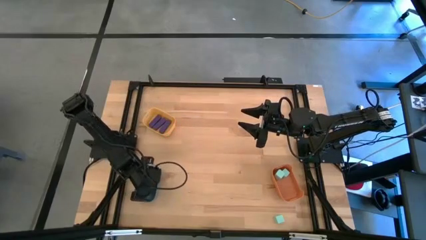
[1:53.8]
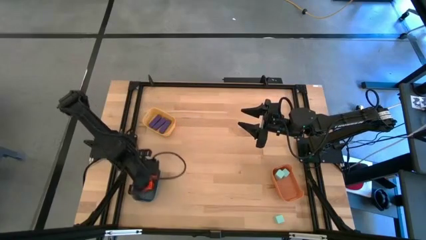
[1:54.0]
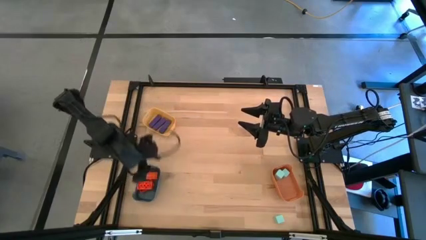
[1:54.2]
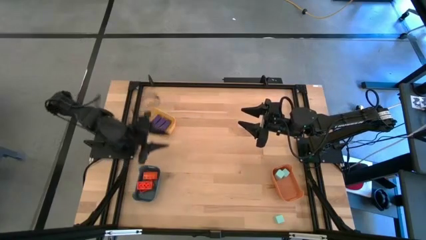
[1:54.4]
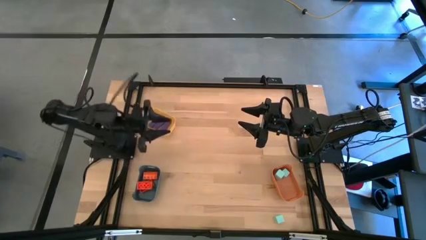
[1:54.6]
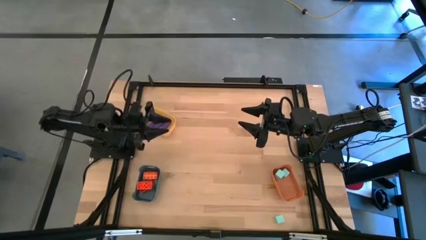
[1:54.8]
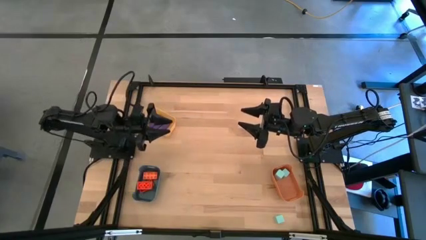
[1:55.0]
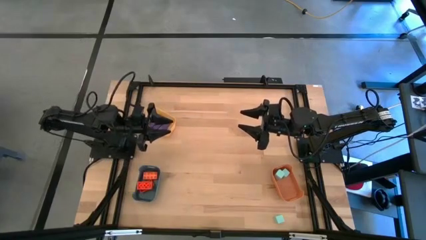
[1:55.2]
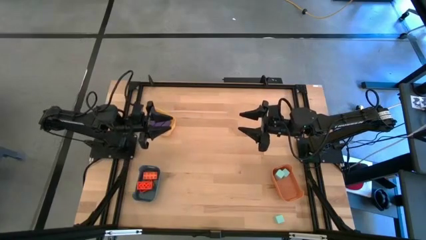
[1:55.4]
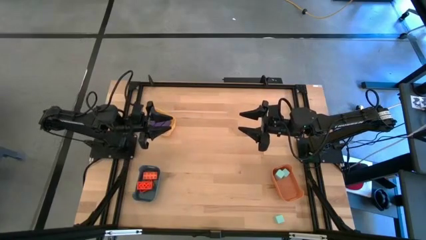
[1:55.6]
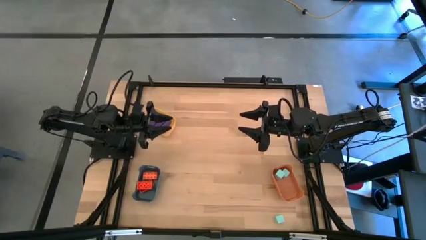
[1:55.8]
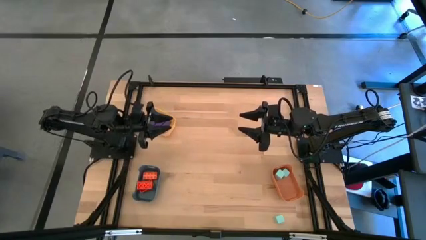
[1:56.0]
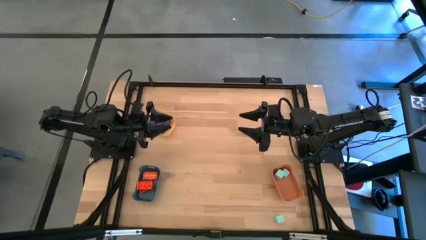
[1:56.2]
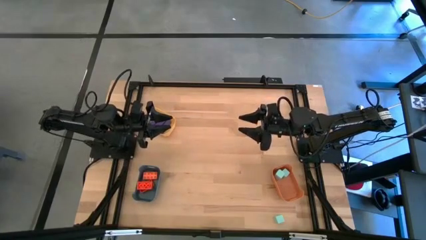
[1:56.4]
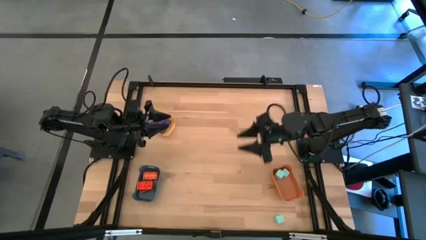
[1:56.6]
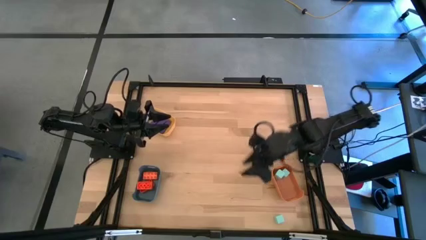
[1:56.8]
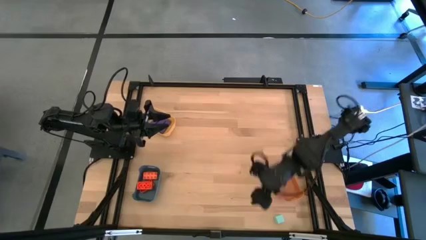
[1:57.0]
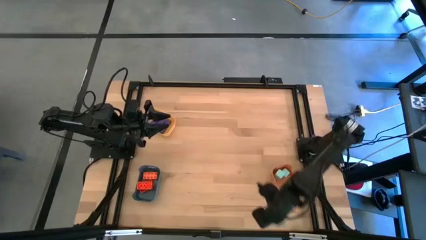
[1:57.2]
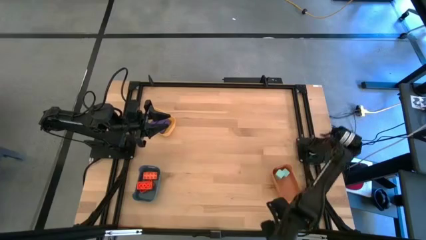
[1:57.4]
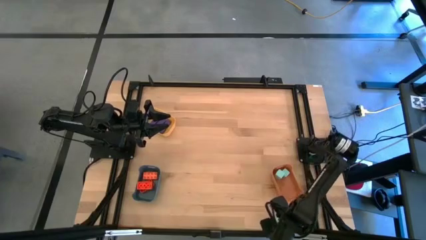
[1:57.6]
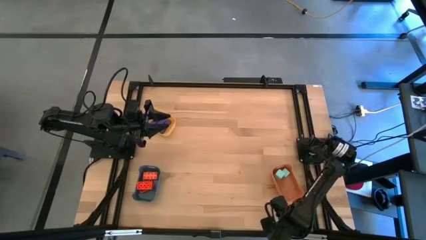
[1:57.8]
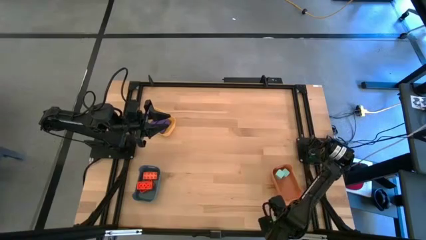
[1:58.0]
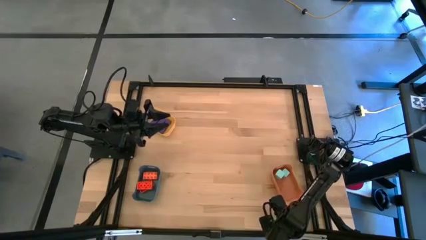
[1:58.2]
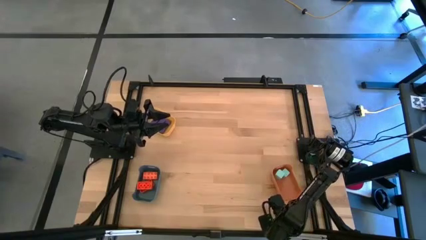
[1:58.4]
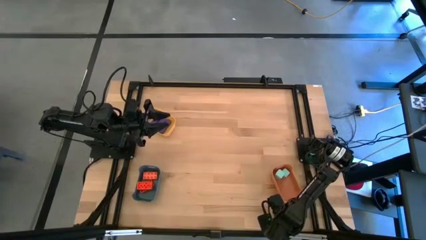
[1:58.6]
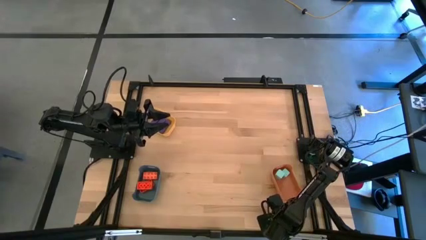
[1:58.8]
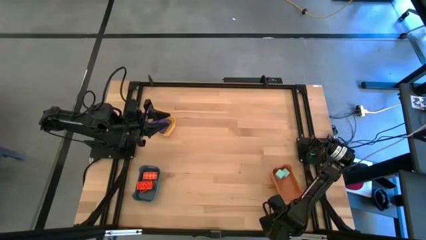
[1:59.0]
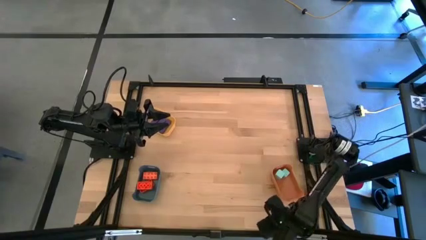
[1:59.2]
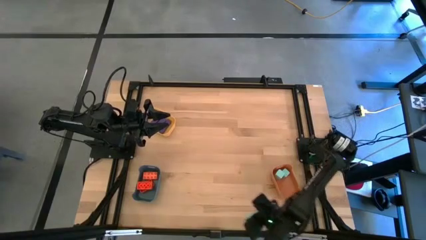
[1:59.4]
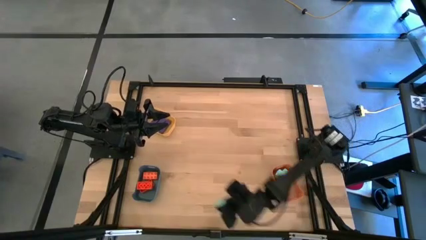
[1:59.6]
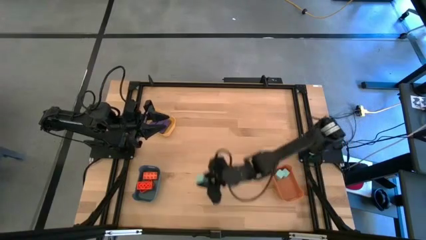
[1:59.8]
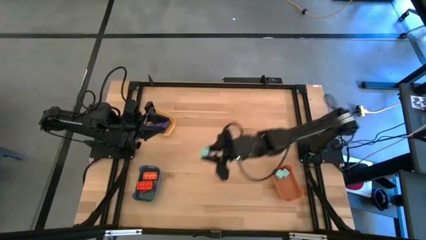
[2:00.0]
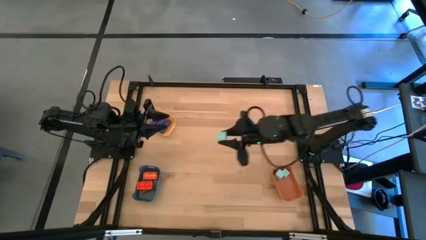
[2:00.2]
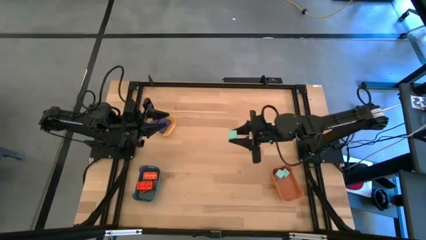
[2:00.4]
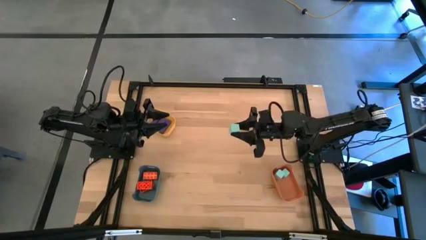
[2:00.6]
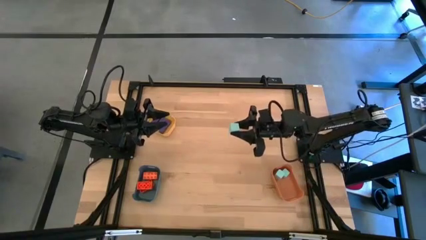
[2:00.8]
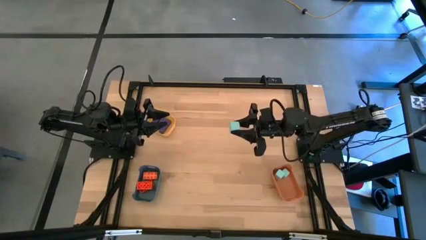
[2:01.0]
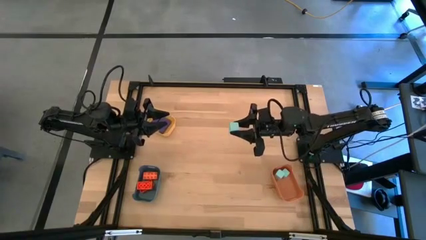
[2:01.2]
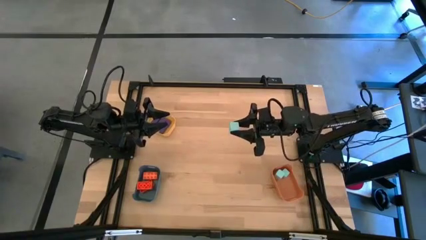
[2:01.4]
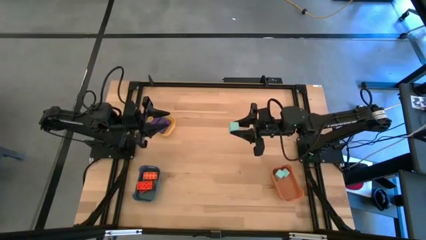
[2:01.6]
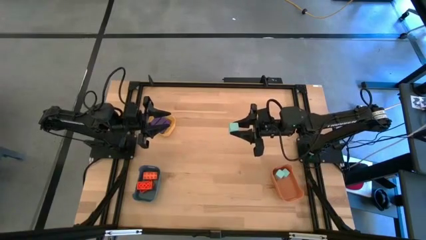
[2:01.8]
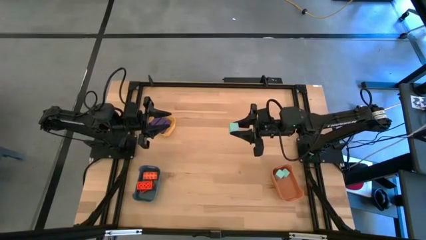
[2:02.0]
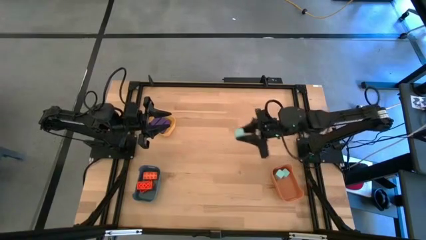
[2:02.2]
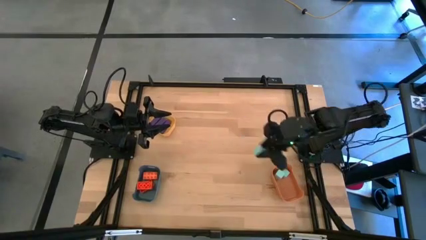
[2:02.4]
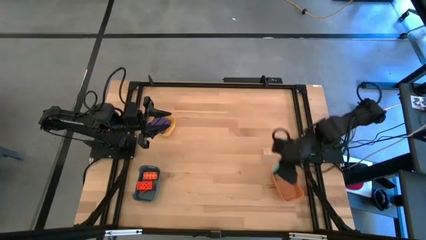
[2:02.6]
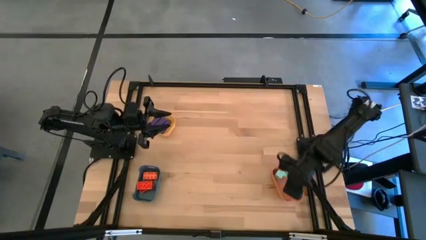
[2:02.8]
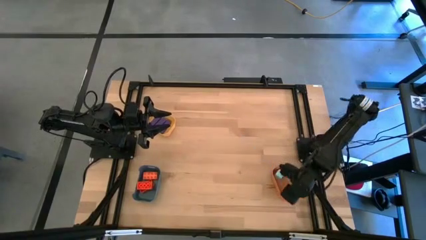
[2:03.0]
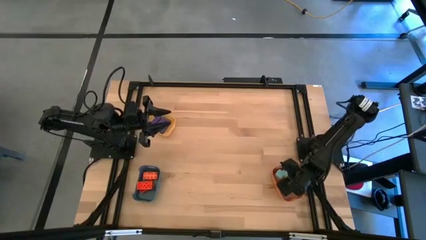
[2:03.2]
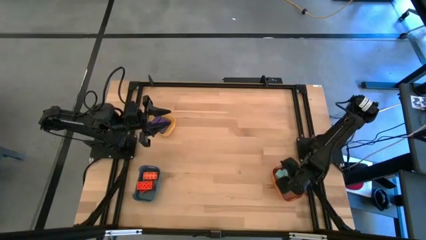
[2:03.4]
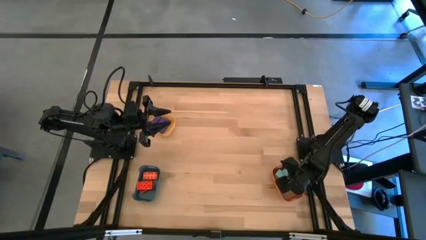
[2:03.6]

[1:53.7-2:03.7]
Task: Sort & place blocks by color
Put the light blue wooden block into the orange bin

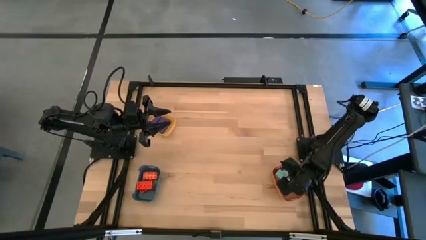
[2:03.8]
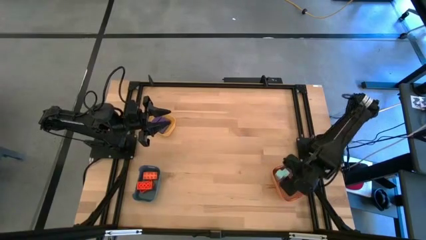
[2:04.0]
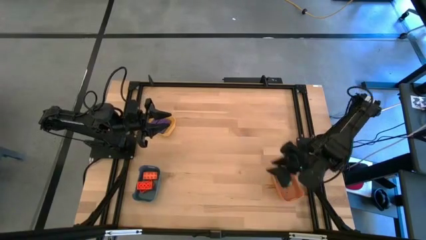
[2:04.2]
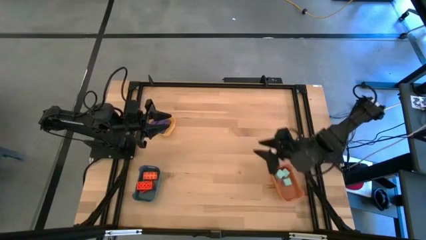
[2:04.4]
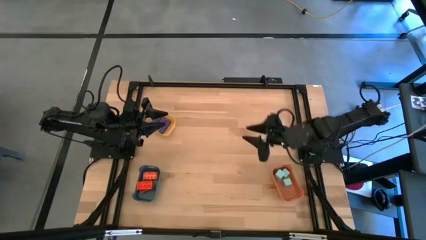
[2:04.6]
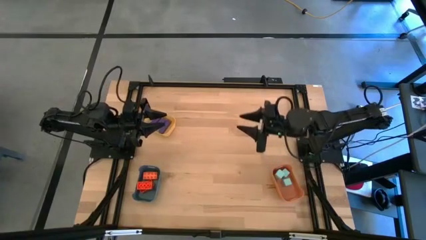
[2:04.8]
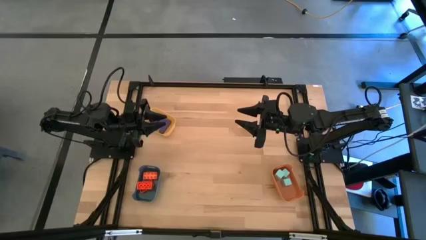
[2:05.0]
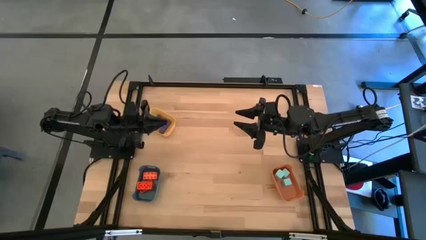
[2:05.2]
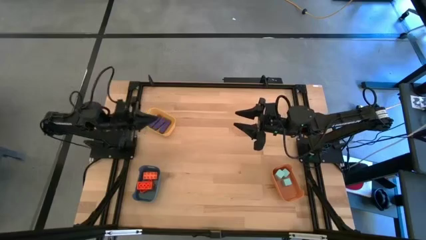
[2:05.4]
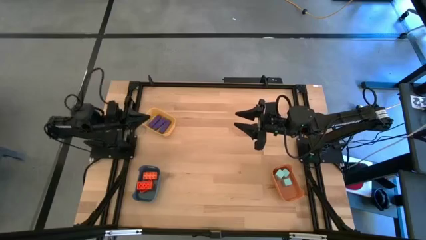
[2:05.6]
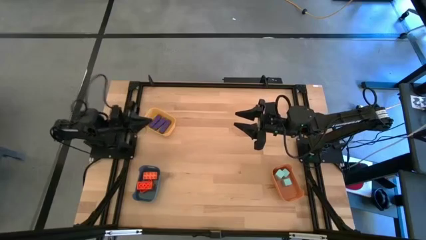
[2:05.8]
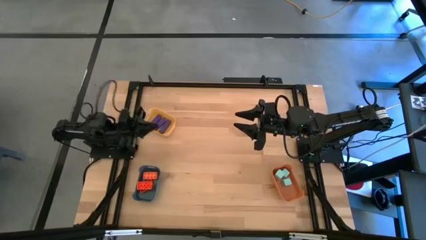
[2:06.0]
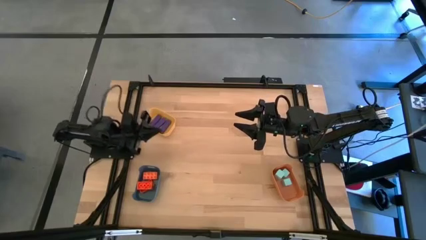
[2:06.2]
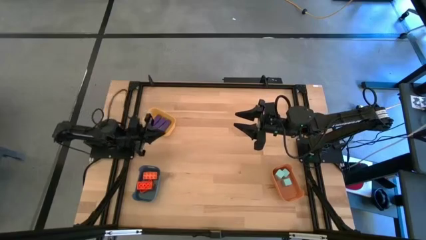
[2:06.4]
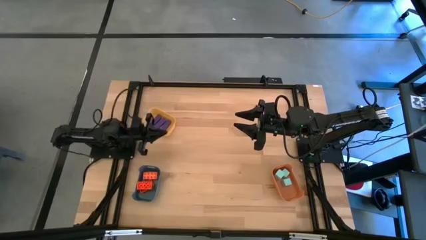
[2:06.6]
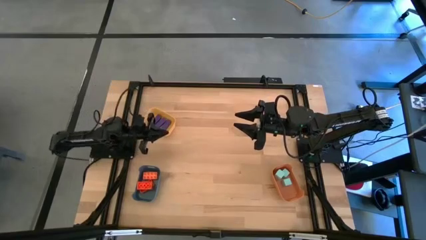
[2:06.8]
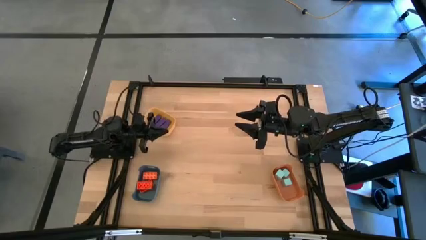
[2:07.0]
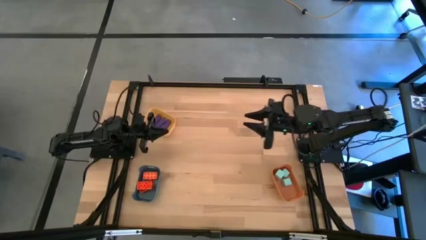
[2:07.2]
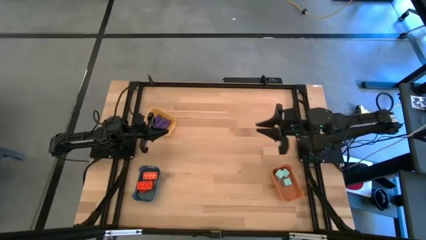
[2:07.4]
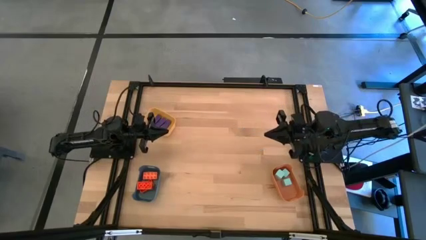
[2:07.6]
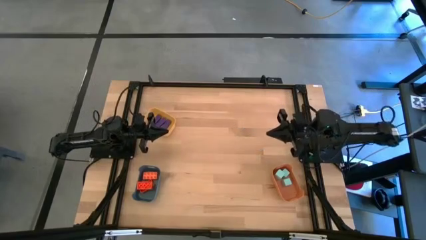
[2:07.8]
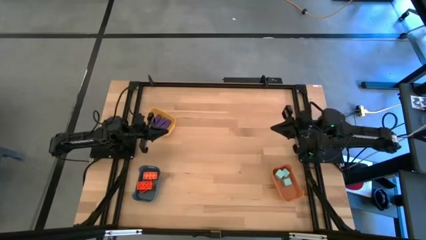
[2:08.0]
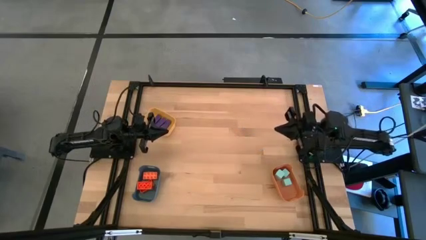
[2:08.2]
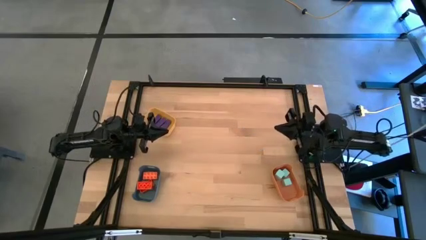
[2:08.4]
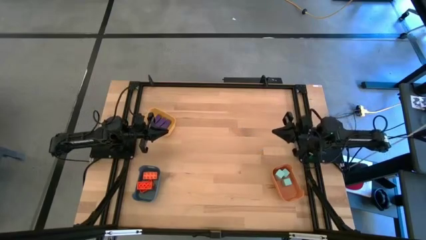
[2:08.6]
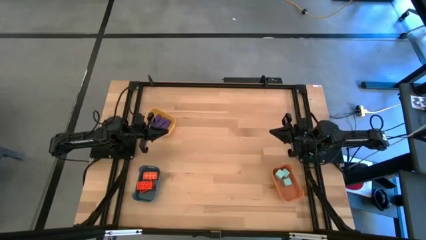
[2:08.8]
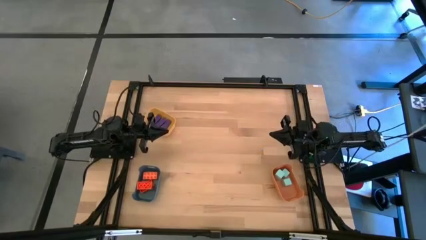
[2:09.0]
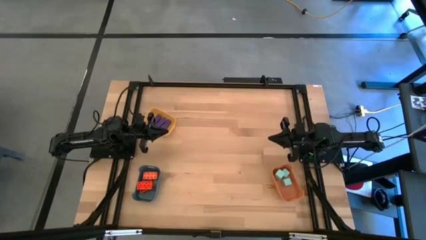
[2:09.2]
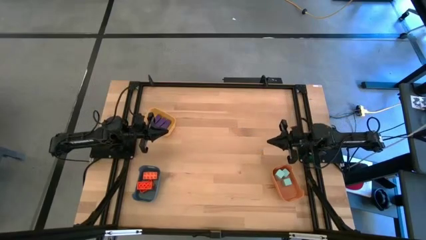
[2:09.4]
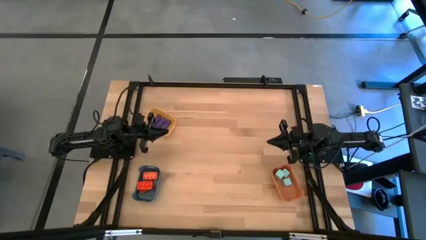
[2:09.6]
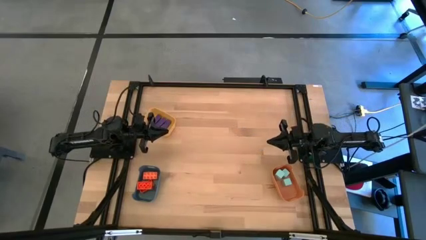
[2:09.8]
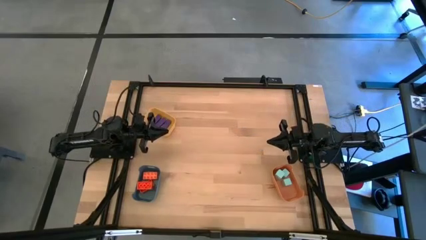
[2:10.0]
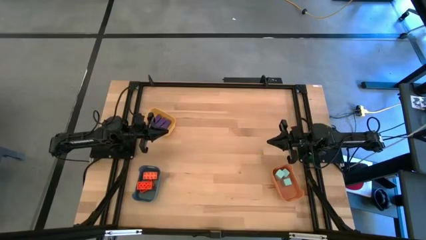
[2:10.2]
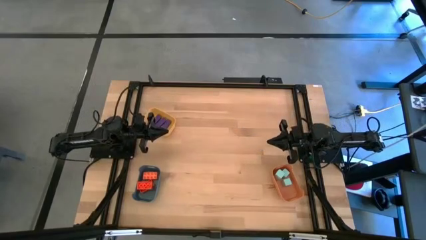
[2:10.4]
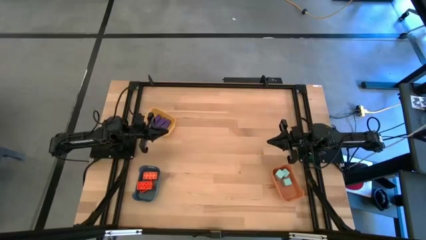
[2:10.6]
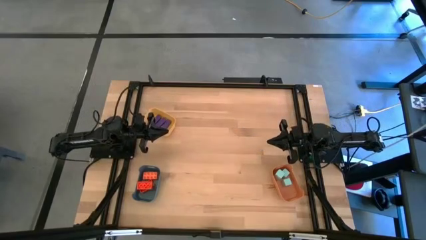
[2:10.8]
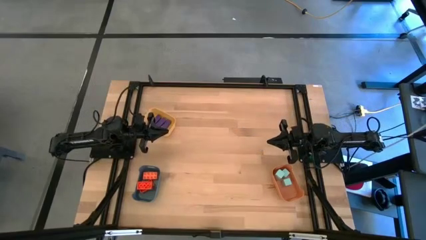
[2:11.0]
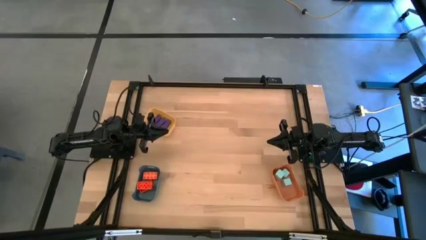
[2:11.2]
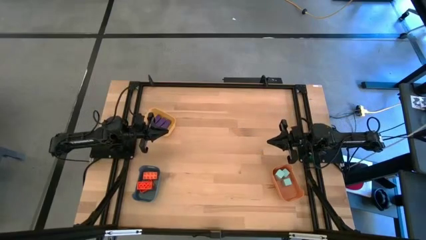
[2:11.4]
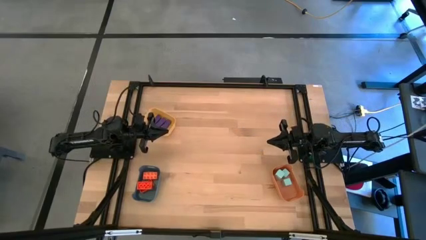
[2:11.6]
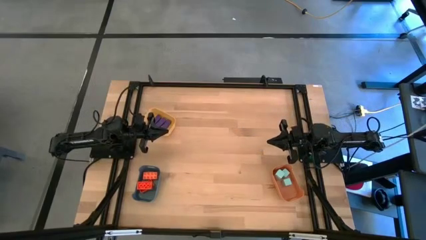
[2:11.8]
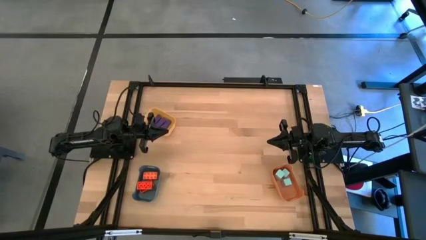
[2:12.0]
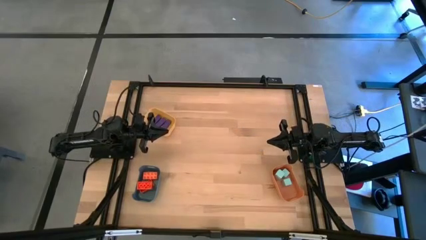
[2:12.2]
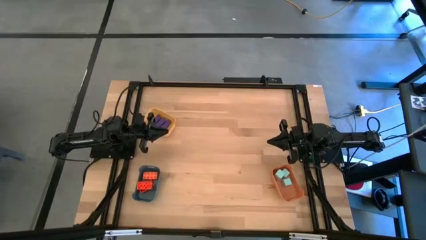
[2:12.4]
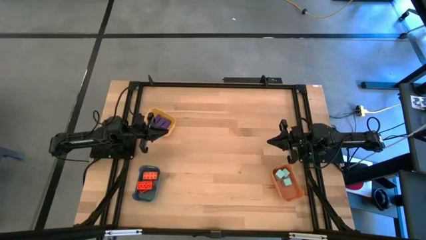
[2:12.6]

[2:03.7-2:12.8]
Return to Home Position
